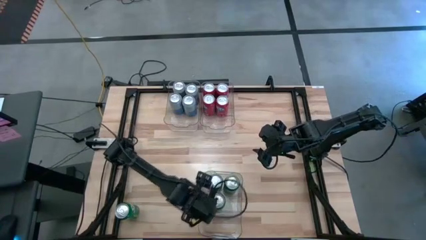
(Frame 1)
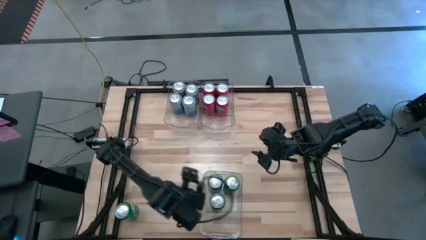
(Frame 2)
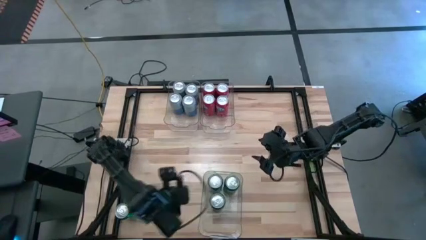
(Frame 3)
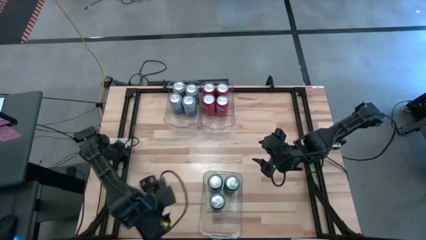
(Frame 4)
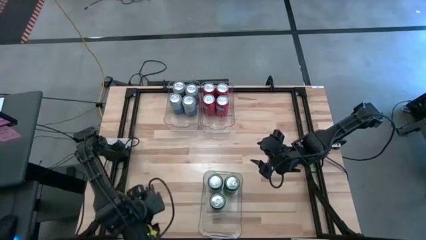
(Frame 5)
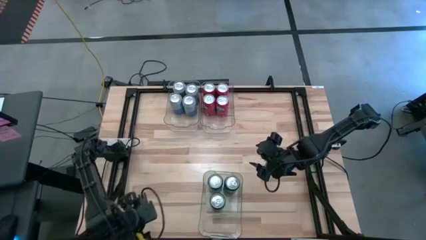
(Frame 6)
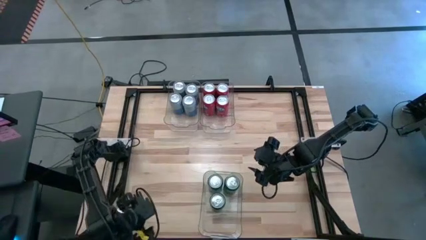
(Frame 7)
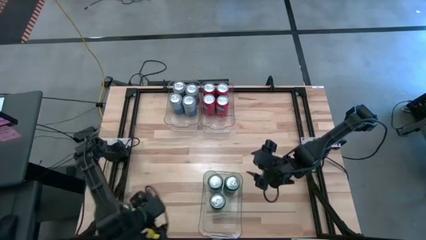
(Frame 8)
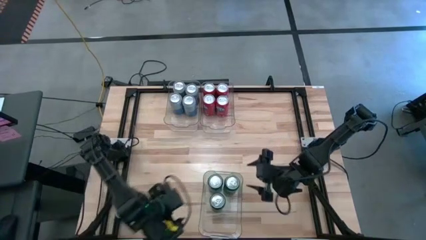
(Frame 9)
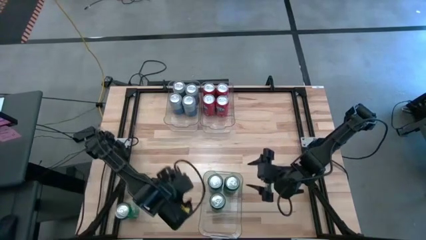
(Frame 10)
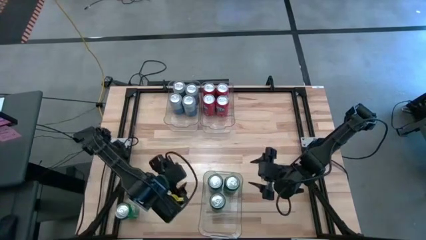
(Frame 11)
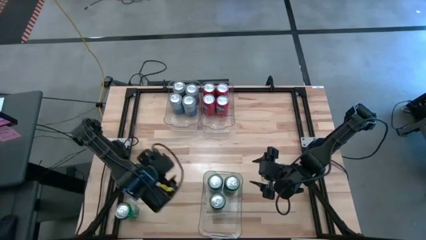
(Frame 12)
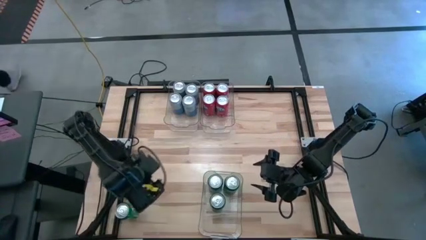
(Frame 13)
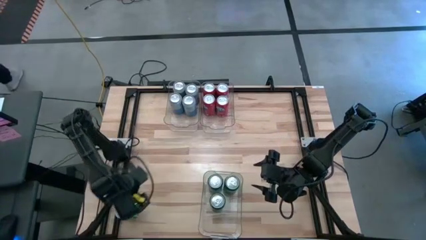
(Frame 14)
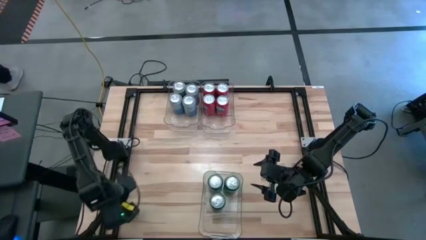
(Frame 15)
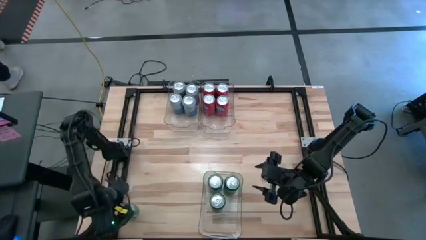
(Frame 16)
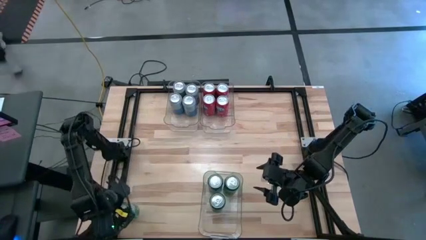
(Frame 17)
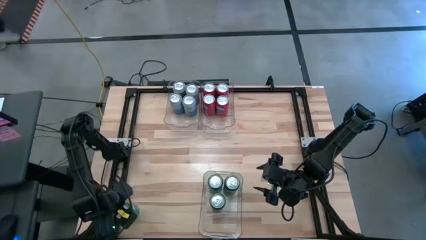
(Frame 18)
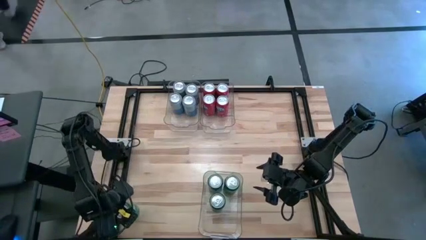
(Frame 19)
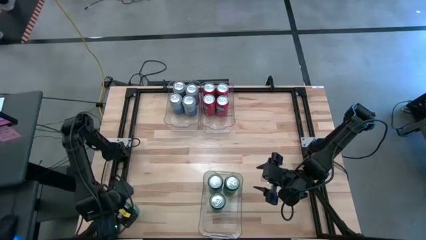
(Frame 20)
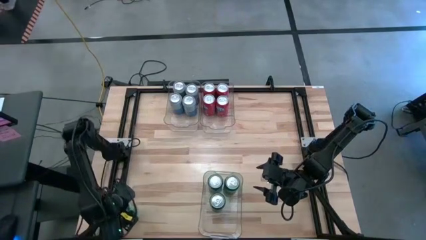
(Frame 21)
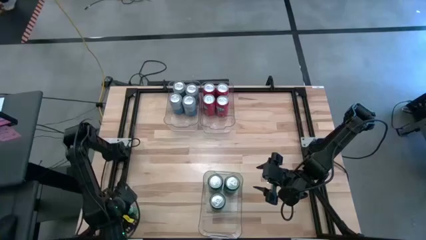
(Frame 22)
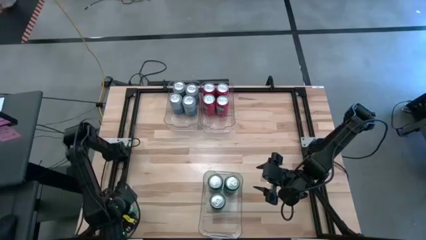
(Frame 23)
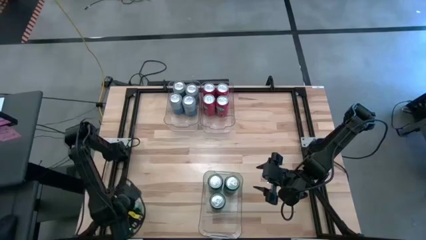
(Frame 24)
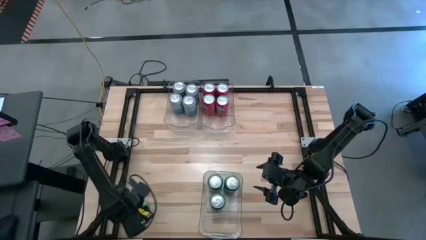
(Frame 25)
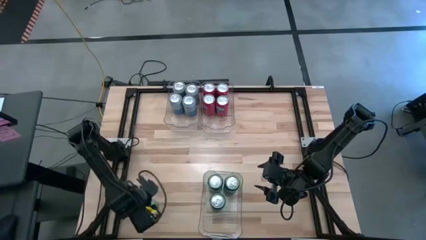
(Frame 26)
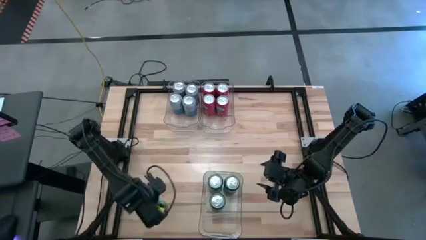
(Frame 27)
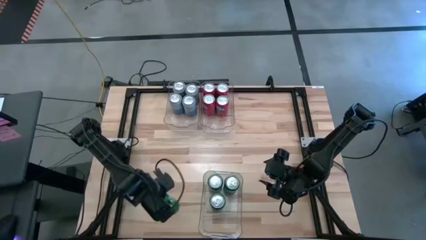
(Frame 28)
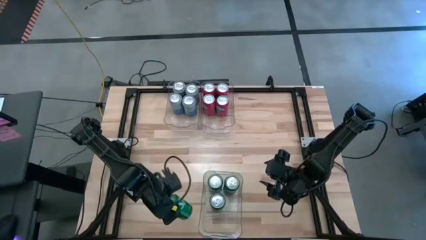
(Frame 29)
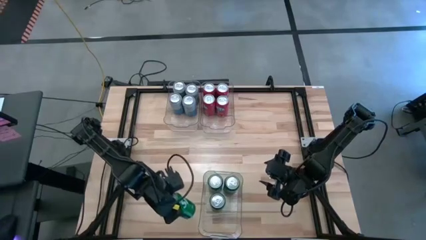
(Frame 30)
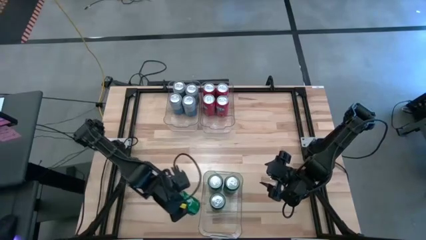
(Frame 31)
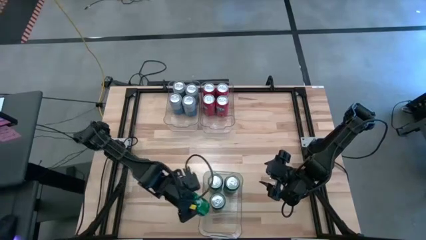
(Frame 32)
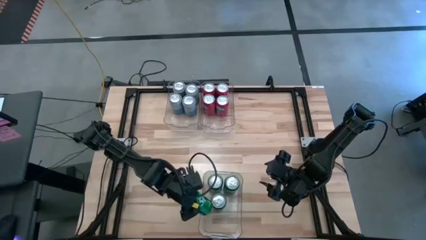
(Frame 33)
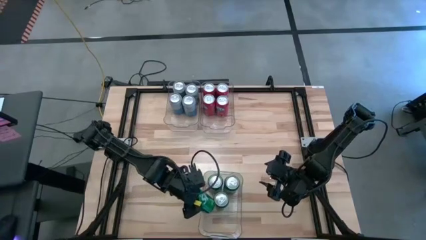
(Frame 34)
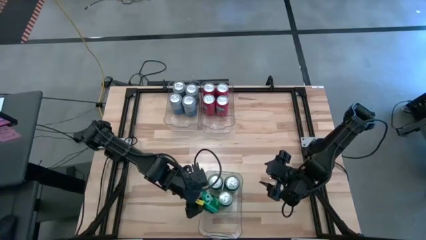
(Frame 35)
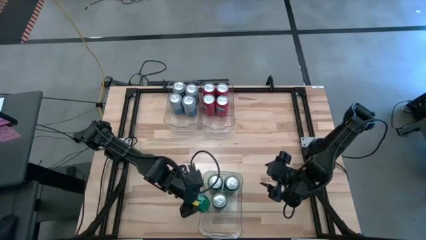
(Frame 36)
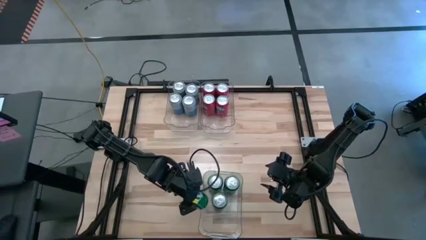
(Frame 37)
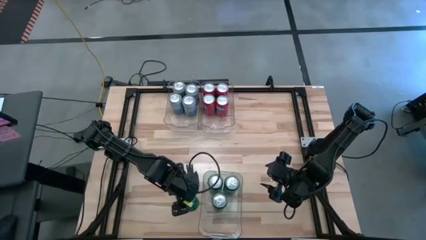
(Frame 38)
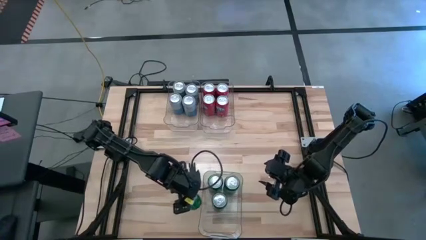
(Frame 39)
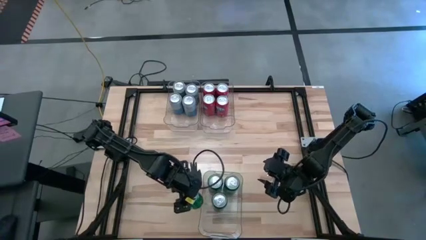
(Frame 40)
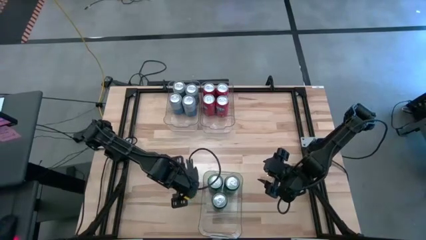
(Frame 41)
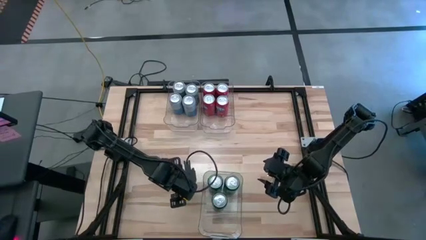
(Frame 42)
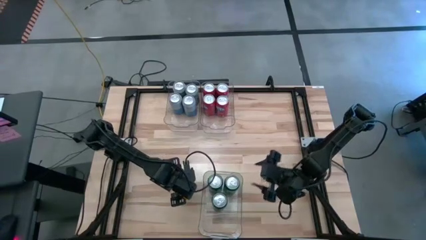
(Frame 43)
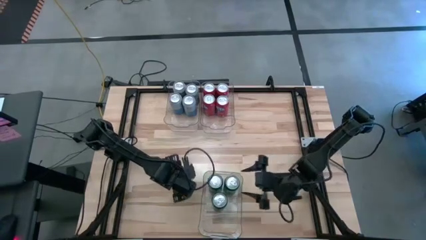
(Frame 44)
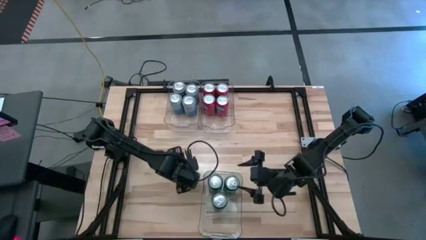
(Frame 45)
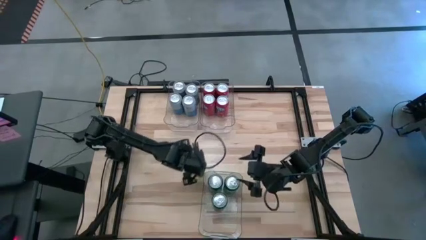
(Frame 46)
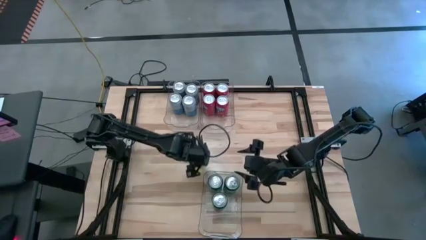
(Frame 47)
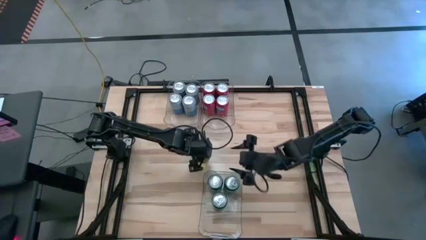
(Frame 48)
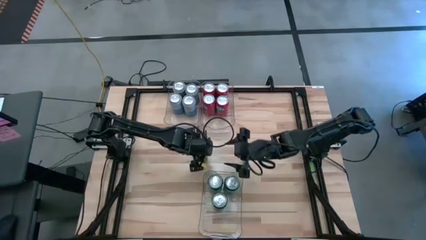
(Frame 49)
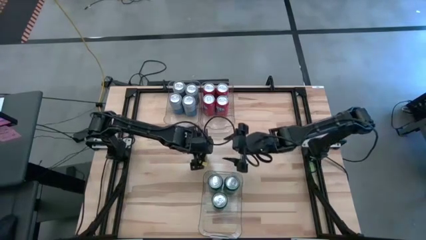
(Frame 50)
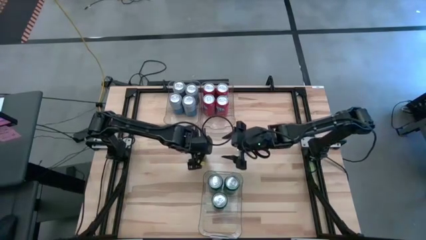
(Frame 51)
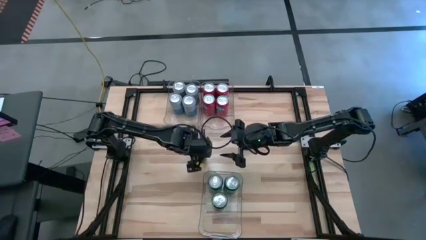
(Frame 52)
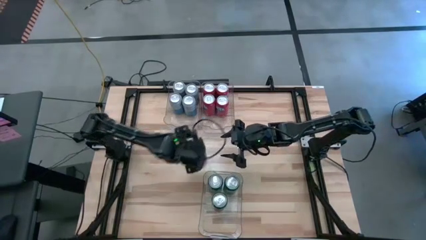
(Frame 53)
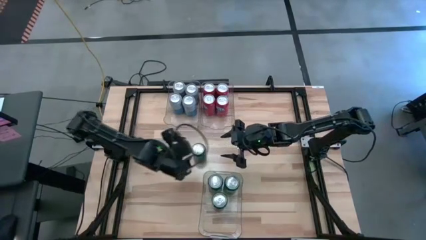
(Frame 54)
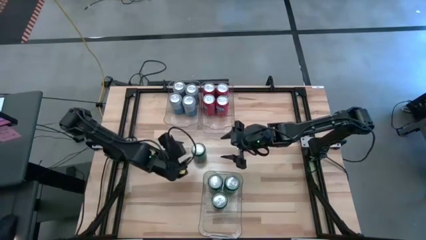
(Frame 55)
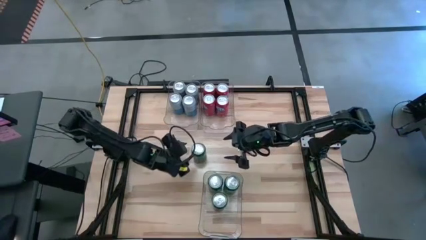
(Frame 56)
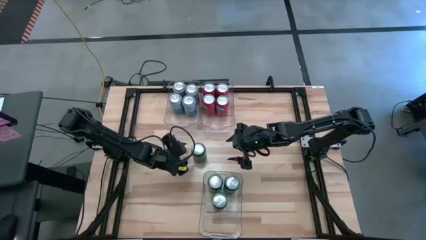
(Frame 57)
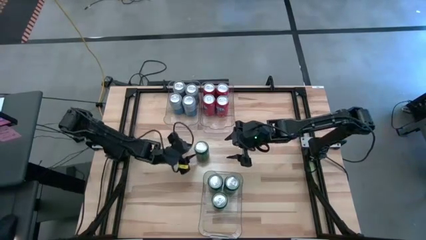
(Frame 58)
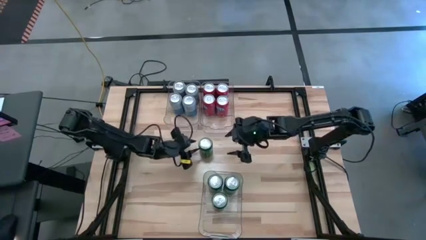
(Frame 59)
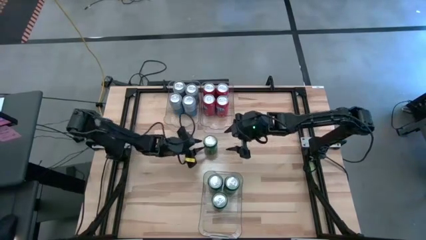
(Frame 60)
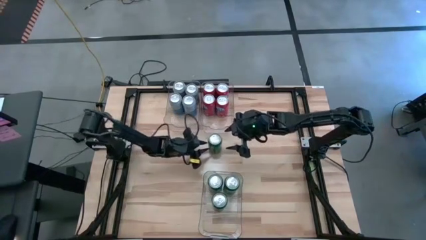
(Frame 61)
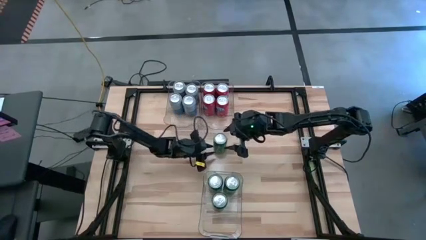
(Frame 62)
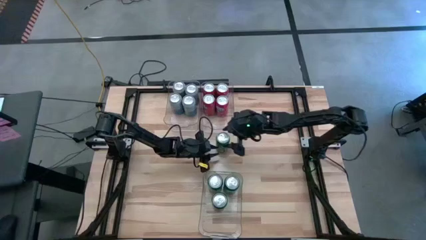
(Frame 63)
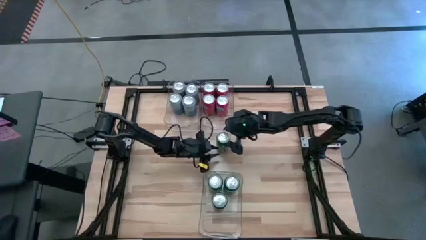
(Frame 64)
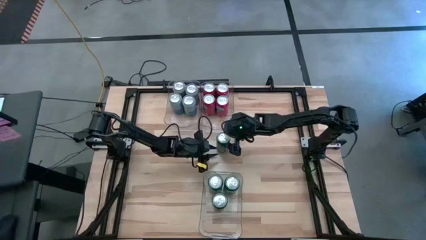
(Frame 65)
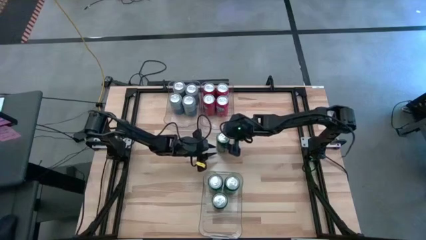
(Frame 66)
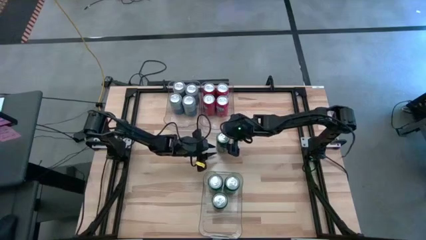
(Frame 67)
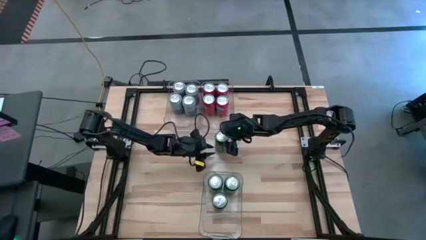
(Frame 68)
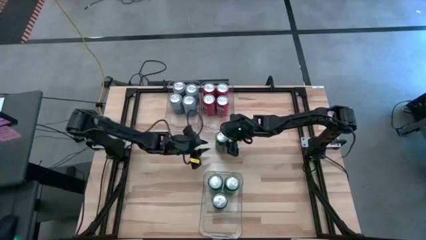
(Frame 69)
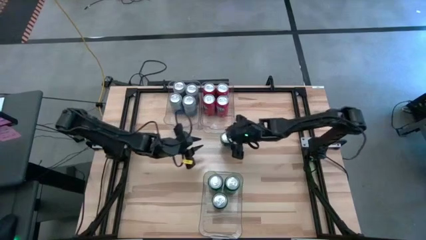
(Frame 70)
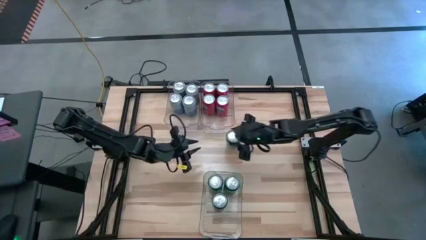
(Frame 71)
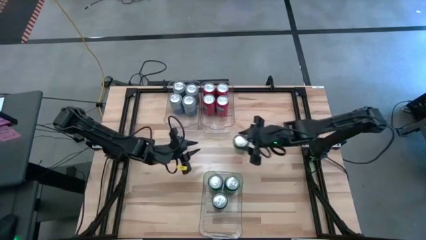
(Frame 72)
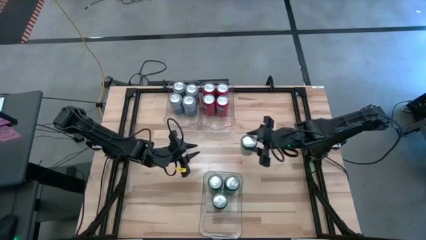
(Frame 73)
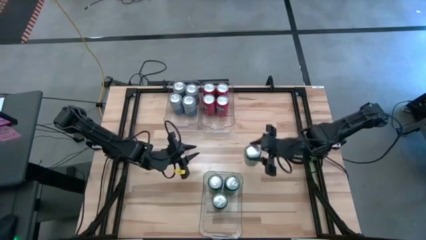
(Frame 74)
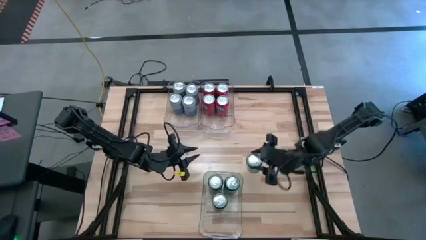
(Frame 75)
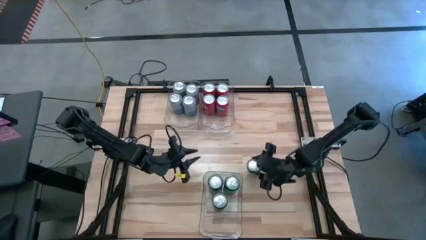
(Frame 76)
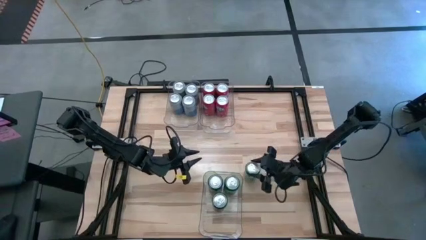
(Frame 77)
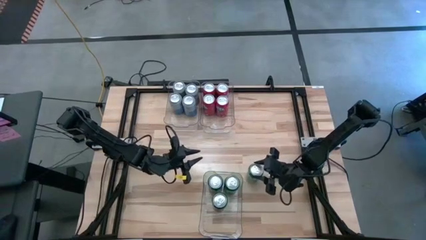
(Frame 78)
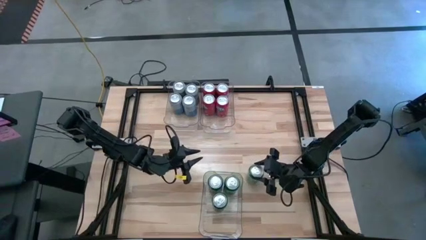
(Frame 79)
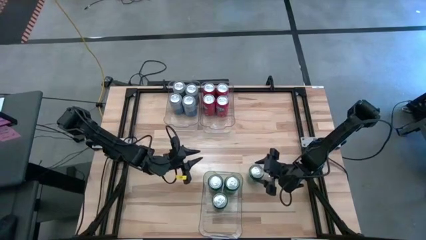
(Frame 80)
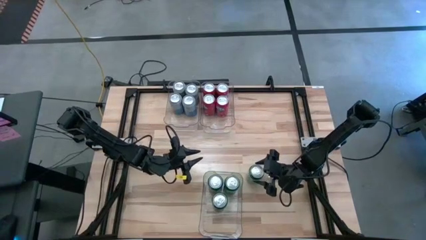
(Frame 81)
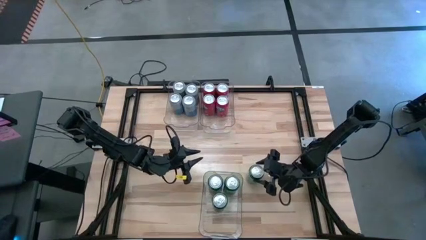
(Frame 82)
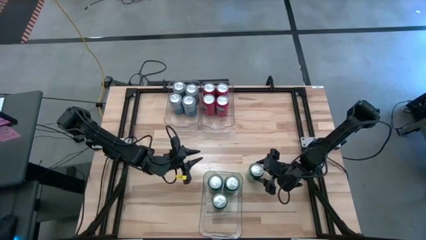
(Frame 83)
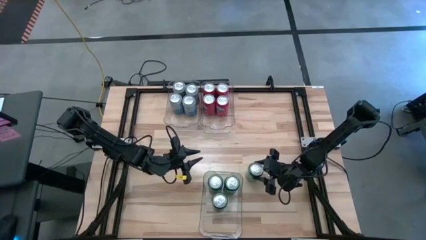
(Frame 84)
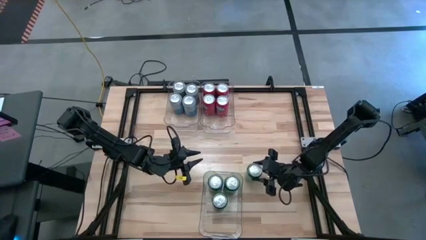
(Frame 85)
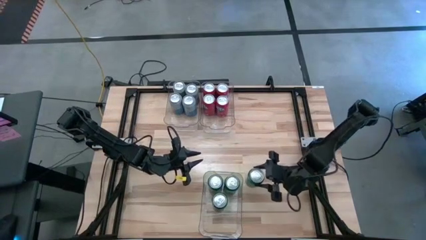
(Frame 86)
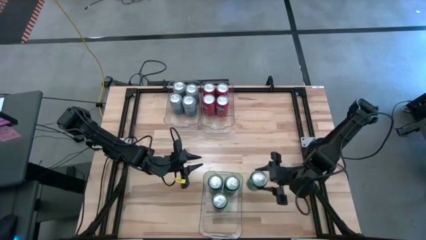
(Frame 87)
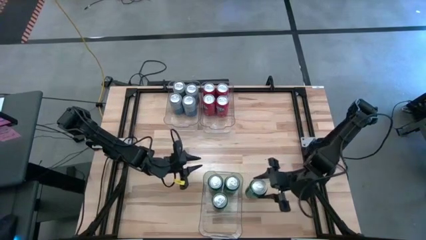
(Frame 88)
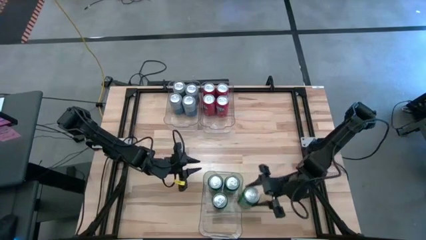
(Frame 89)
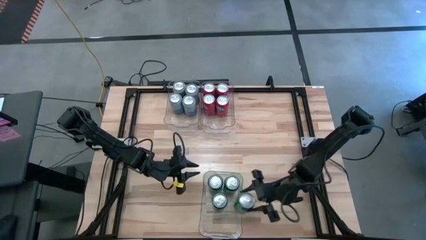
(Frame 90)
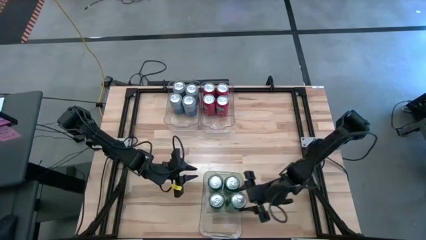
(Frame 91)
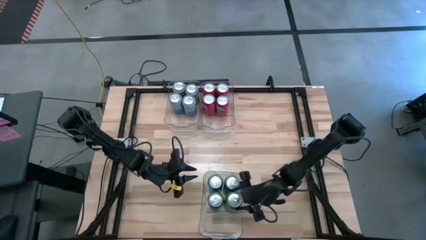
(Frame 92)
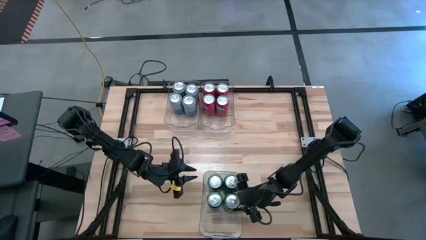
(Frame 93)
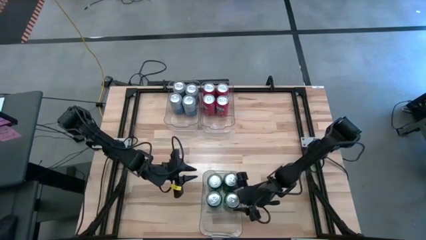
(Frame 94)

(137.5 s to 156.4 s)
Task: Sort soda cans
Put the green soda can into the bottom transparent bin
